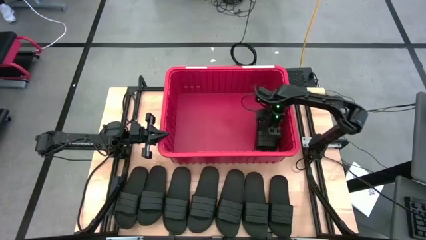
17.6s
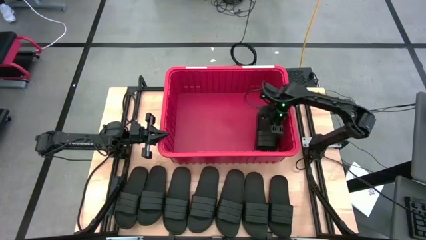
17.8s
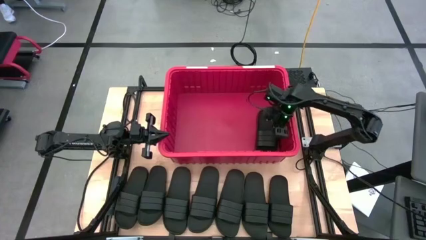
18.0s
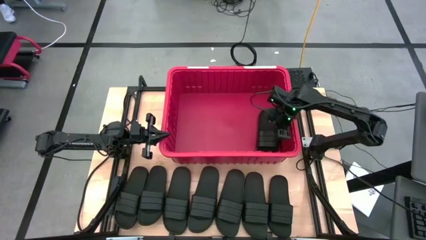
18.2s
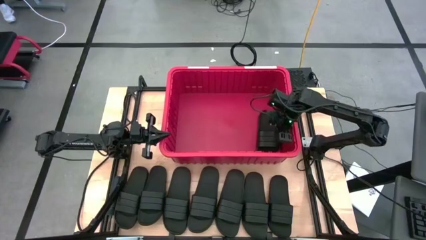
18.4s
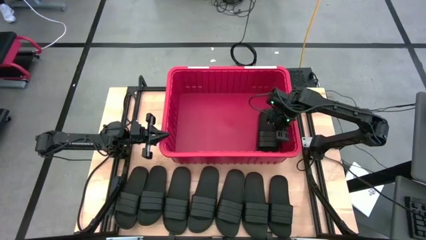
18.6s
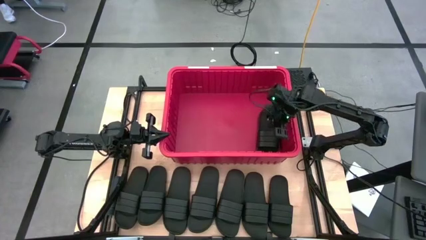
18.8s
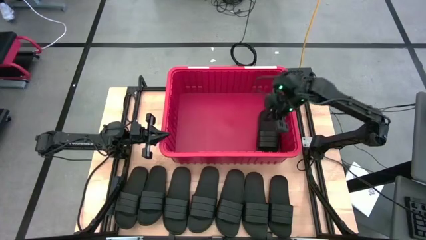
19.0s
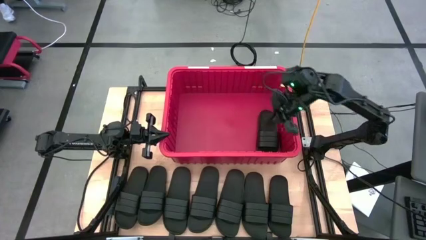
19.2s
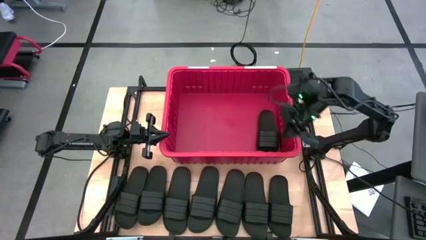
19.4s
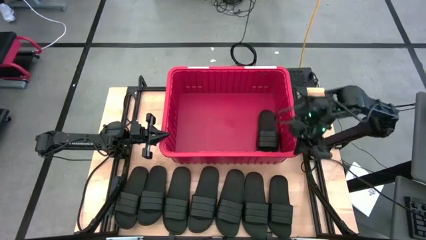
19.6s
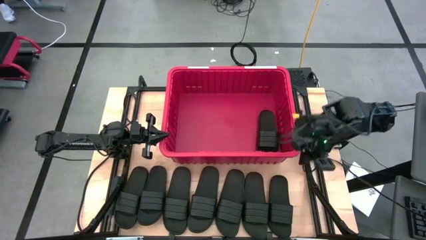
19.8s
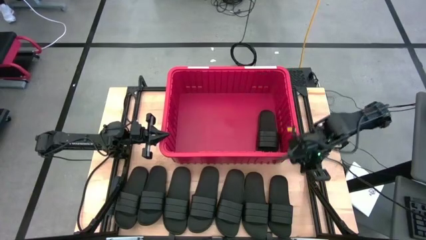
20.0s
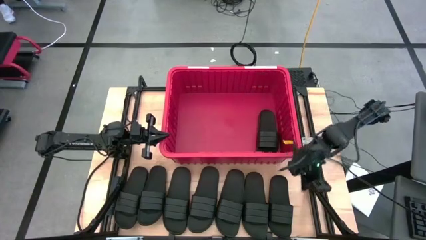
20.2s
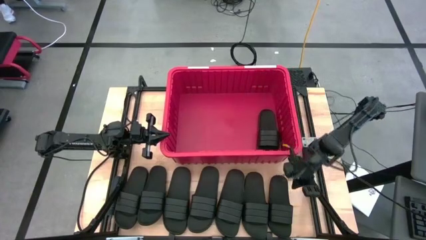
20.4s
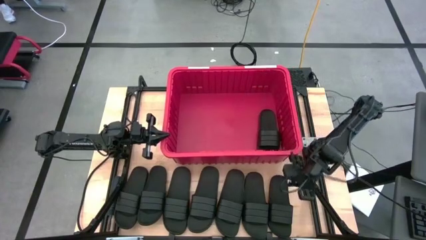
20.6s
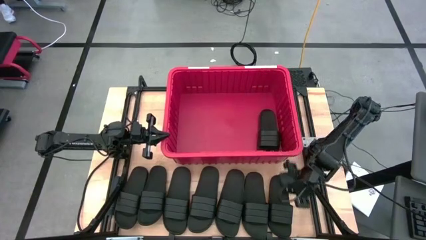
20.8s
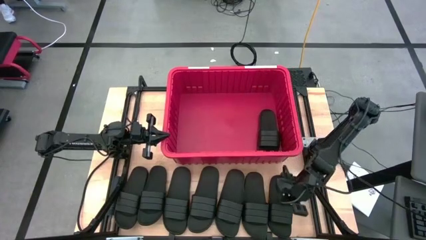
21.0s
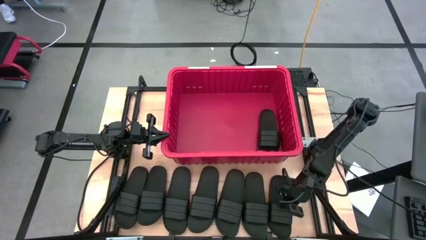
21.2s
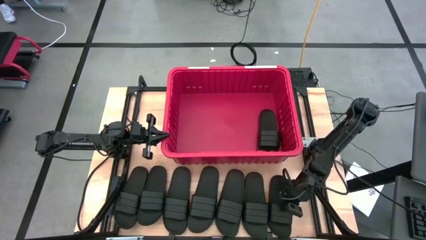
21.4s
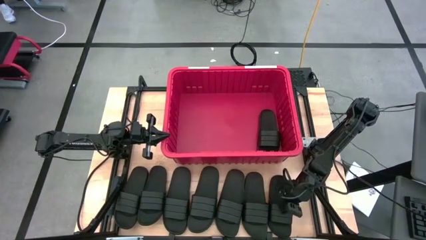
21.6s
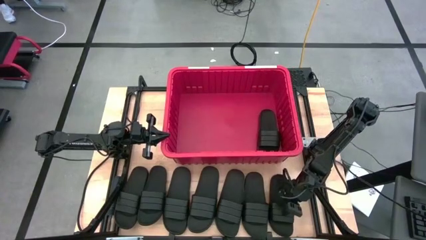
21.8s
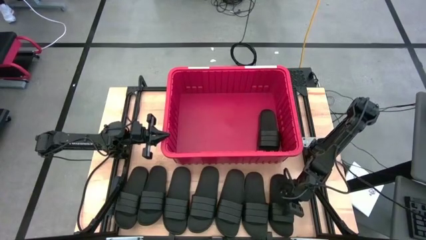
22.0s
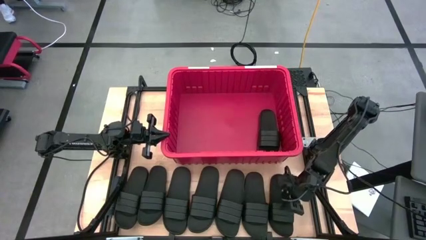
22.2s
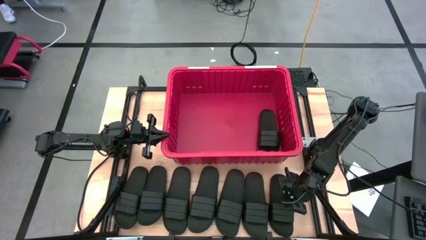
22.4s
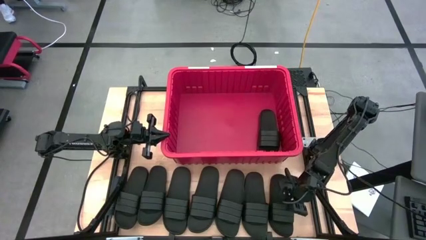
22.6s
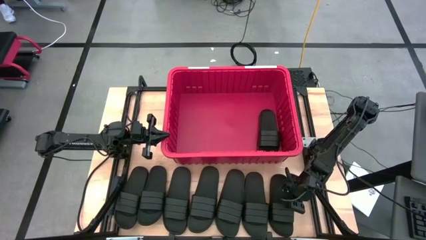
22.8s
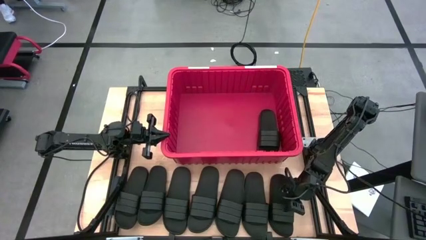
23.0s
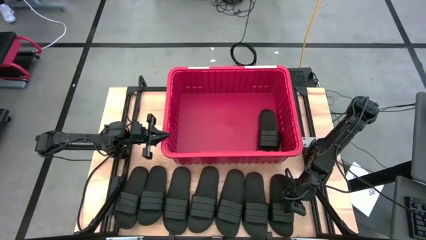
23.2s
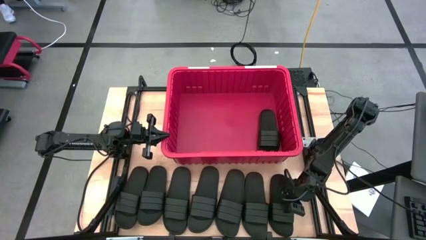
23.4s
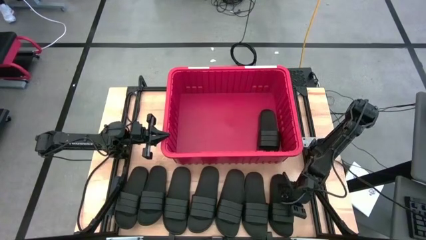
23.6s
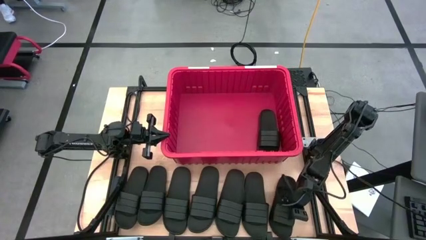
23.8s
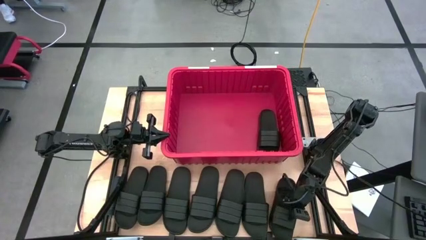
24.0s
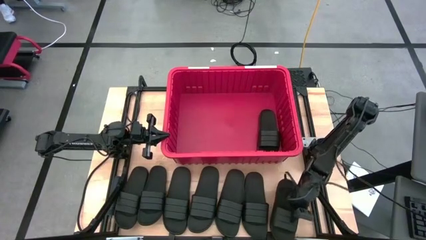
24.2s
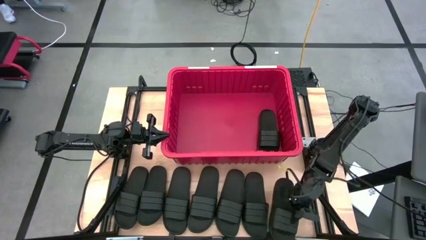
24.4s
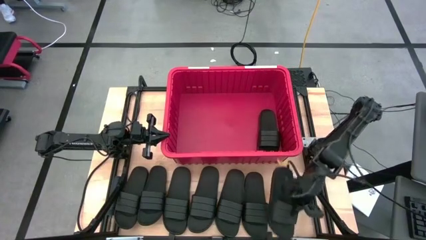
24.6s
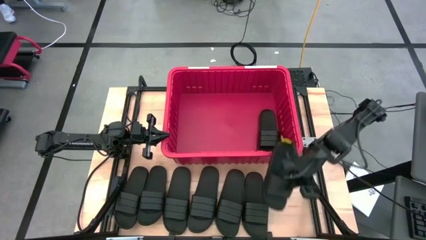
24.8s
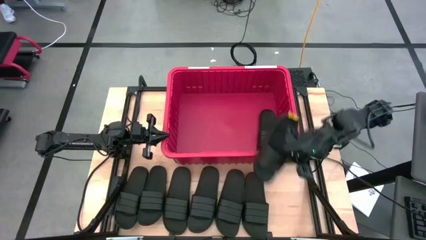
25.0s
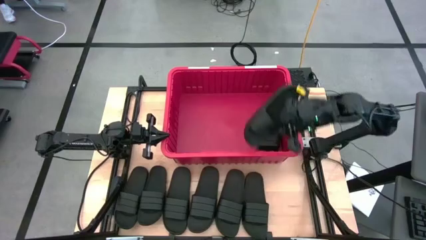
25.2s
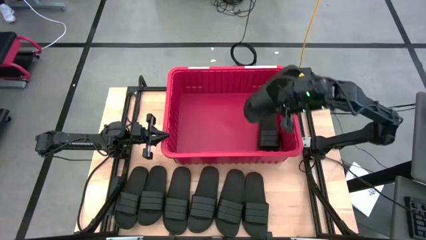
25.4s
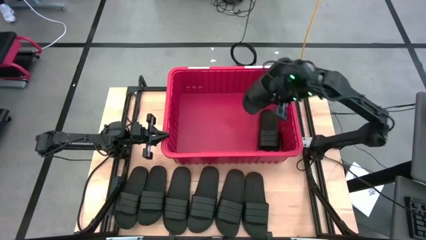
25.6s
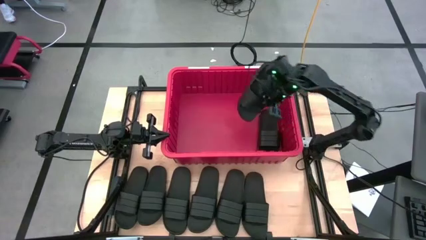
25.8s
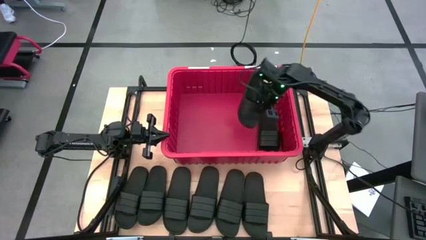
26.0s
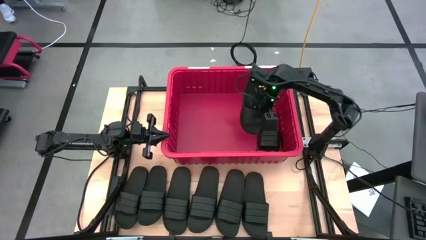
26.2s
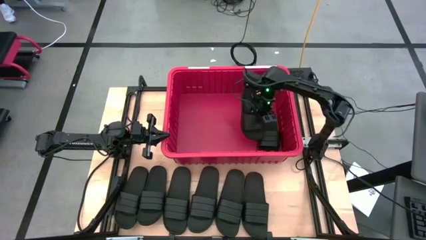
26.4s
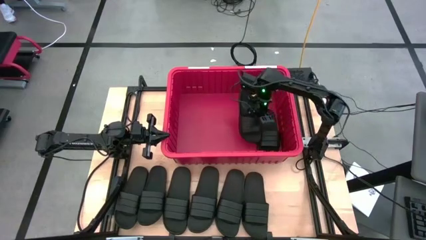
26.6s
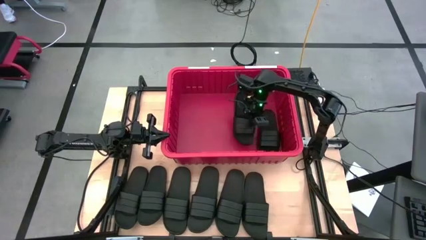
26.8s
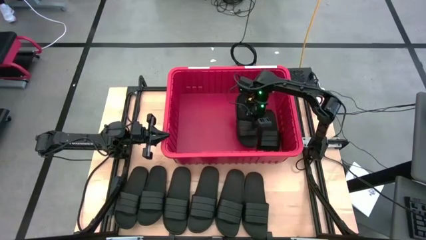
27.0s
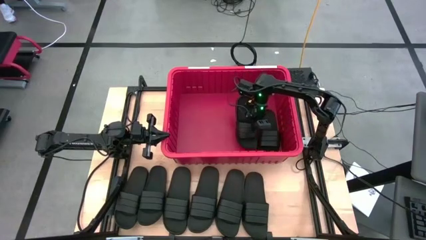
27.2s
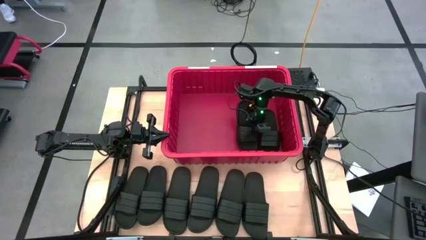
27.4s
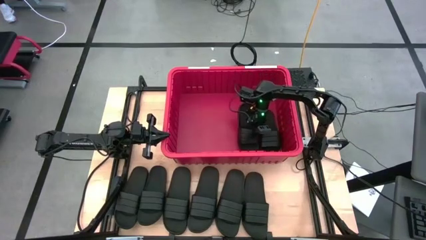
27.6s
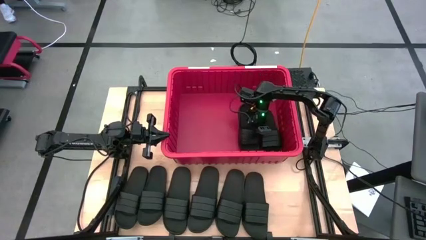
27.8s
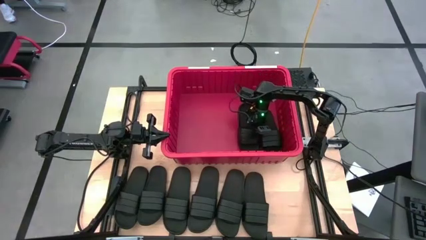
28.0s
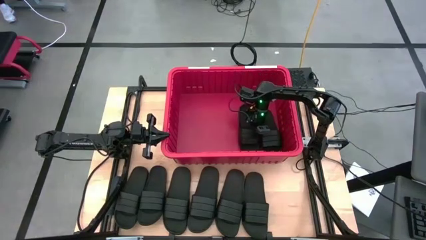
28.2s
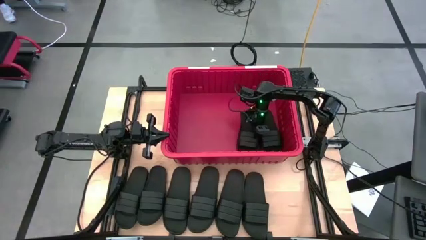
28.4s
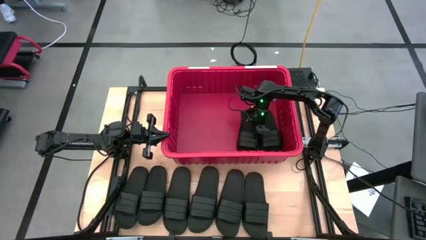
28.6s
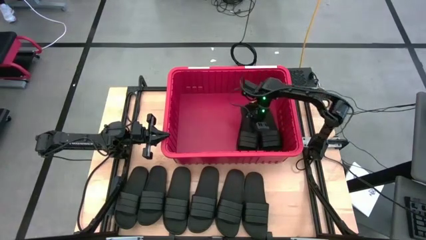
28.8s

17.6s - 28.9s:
Task: Pick and place slides into bin
Put the black slide into the red bin
